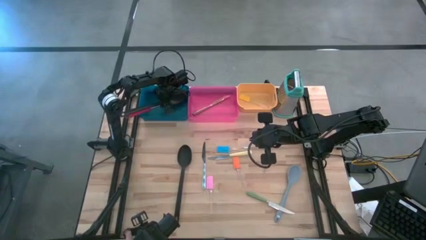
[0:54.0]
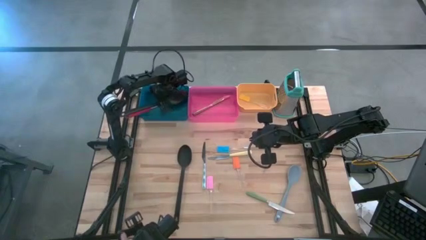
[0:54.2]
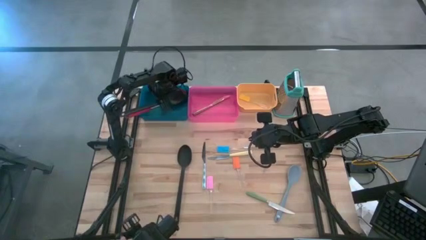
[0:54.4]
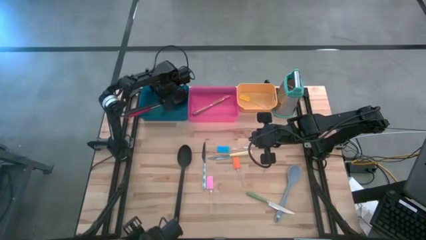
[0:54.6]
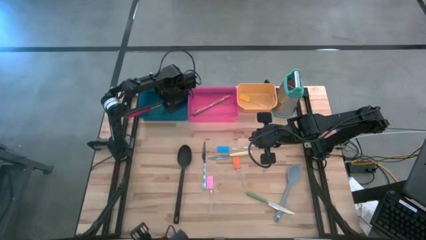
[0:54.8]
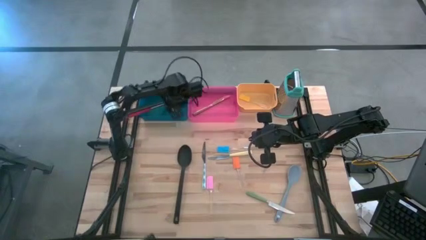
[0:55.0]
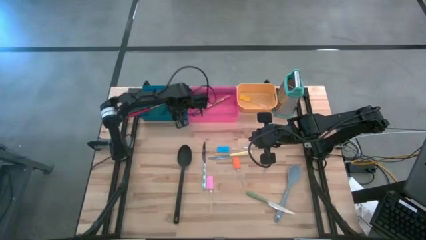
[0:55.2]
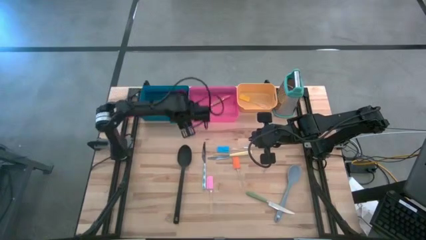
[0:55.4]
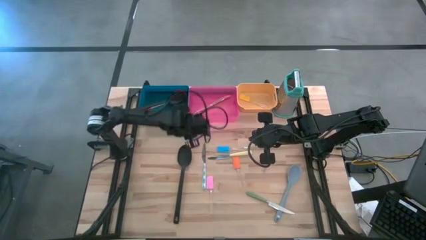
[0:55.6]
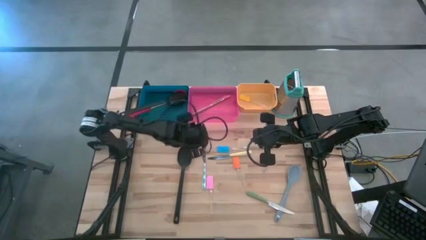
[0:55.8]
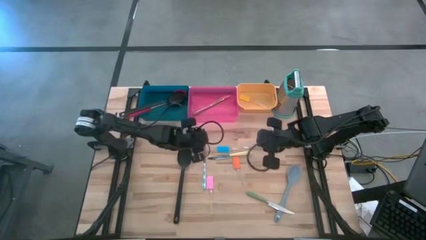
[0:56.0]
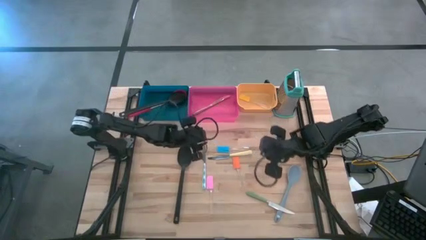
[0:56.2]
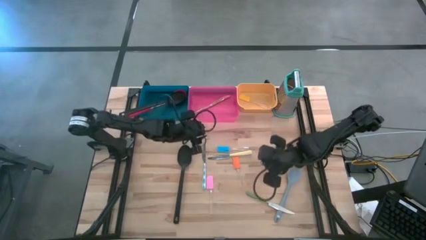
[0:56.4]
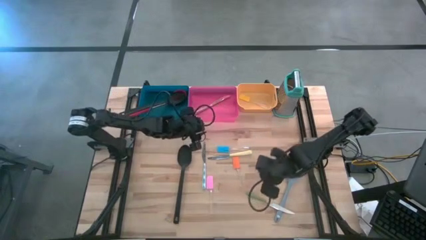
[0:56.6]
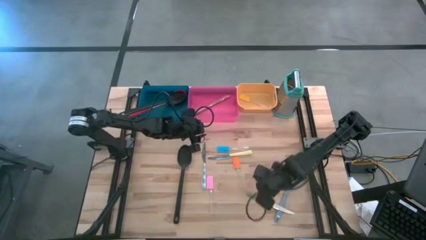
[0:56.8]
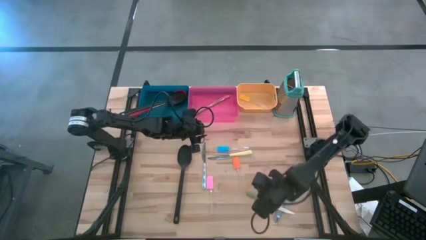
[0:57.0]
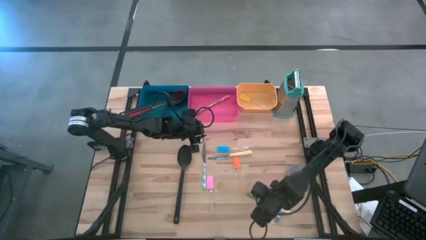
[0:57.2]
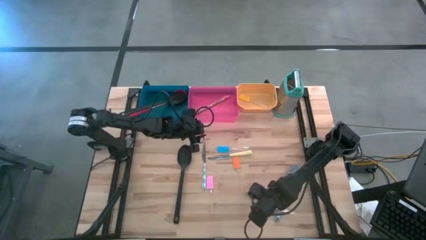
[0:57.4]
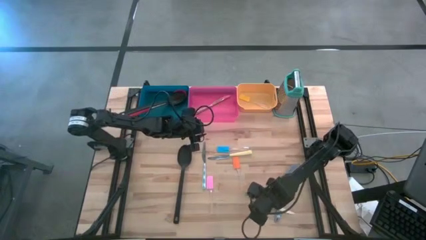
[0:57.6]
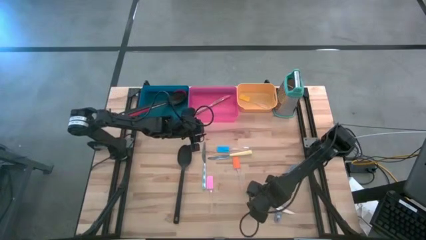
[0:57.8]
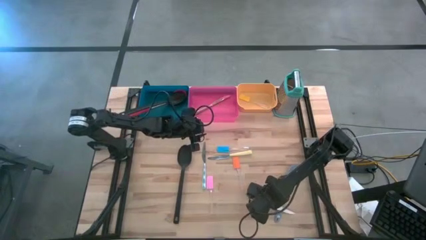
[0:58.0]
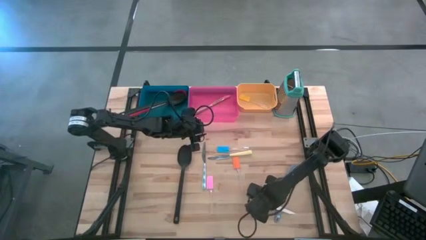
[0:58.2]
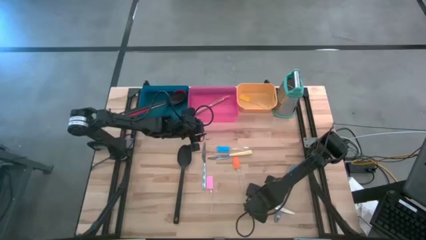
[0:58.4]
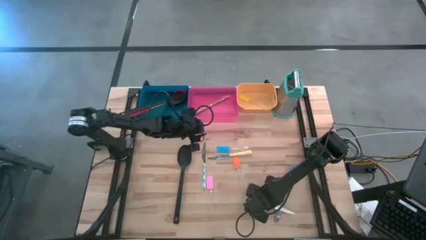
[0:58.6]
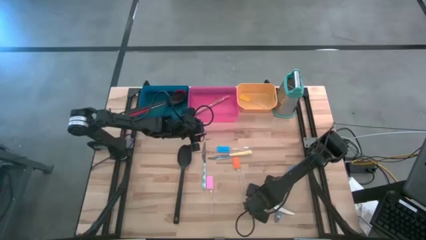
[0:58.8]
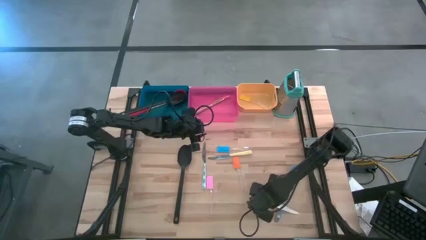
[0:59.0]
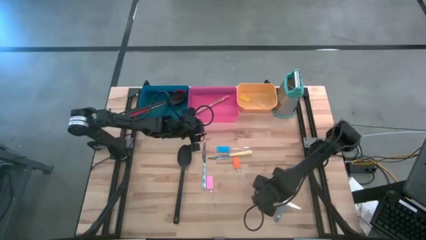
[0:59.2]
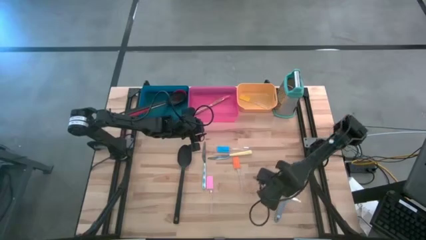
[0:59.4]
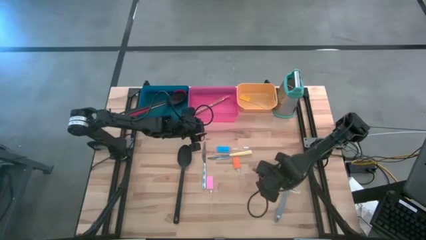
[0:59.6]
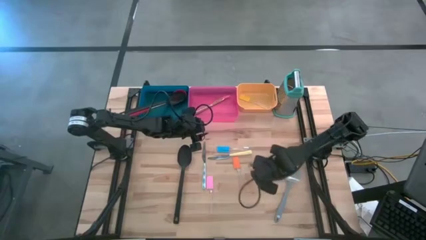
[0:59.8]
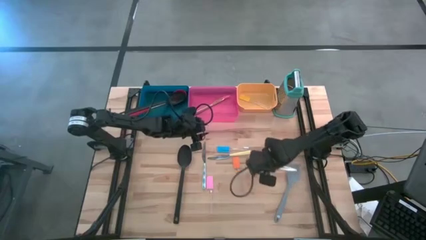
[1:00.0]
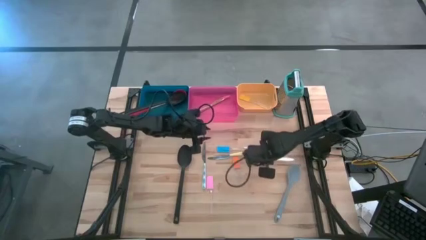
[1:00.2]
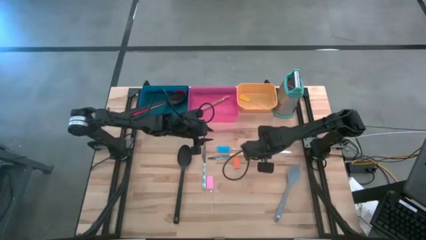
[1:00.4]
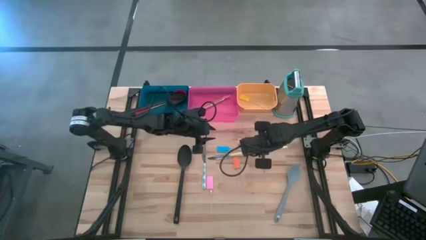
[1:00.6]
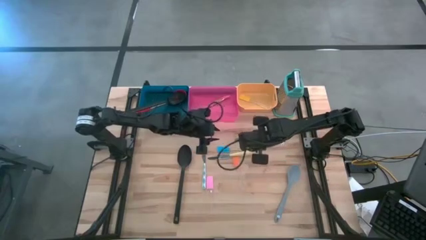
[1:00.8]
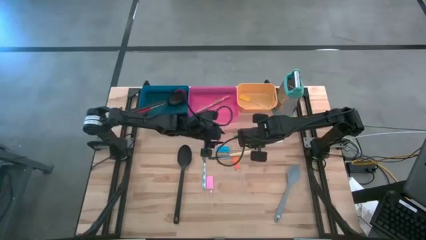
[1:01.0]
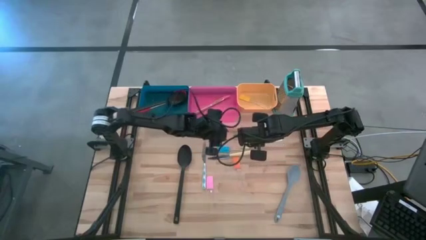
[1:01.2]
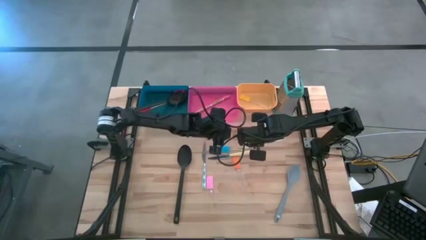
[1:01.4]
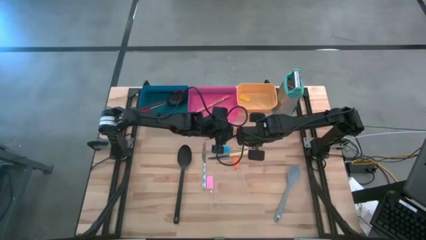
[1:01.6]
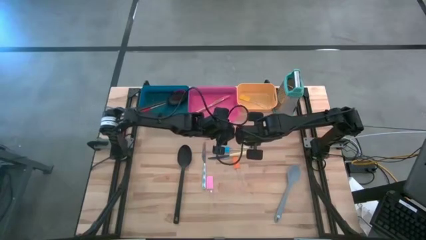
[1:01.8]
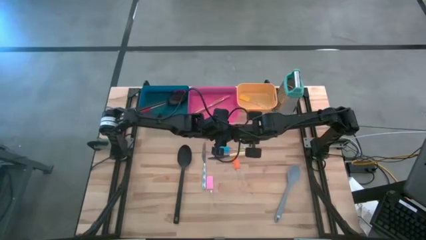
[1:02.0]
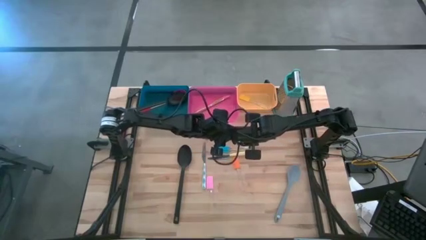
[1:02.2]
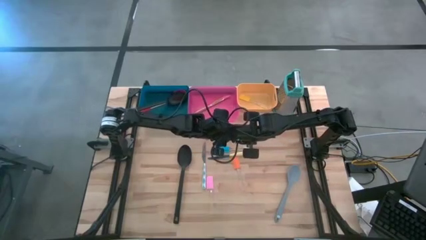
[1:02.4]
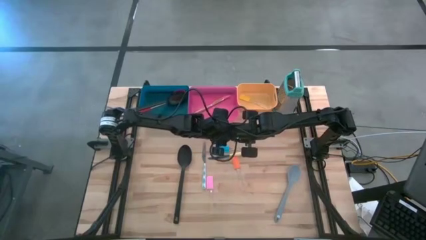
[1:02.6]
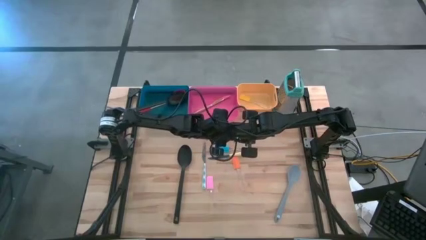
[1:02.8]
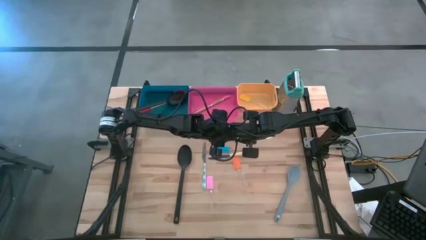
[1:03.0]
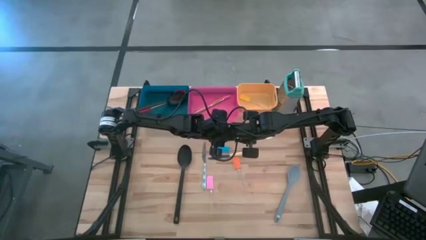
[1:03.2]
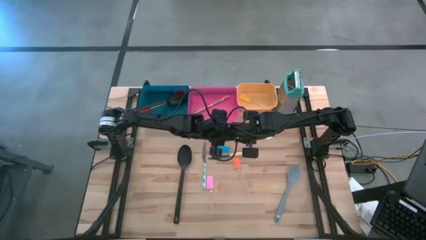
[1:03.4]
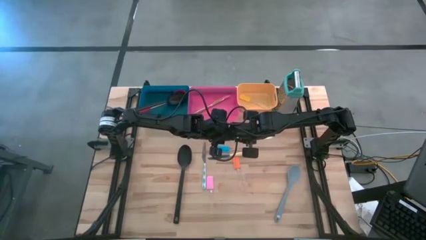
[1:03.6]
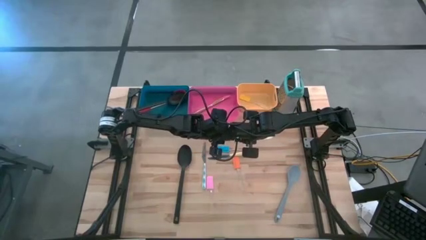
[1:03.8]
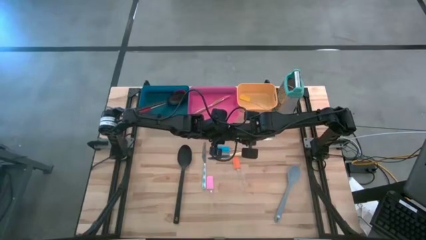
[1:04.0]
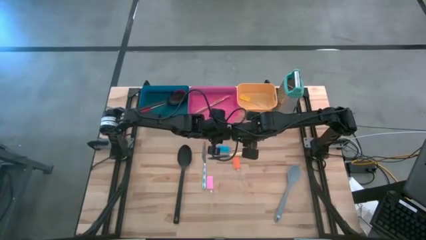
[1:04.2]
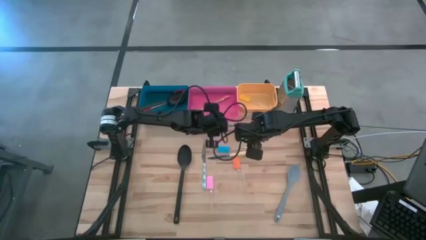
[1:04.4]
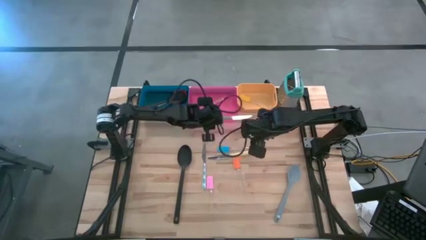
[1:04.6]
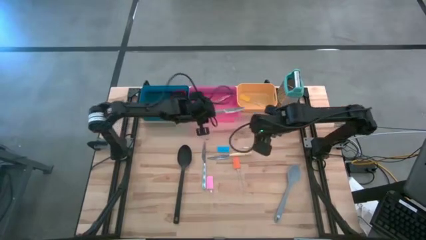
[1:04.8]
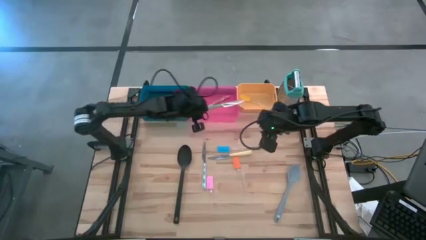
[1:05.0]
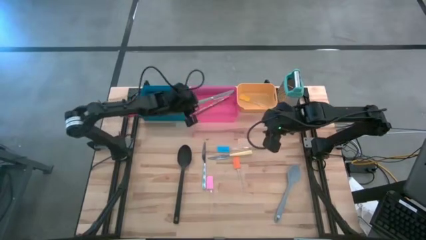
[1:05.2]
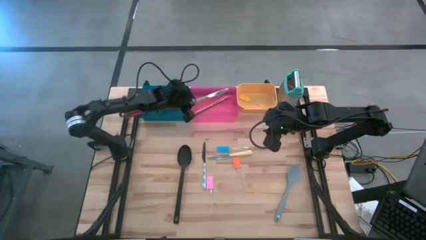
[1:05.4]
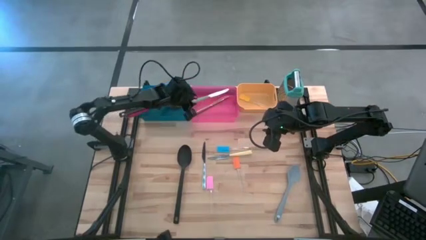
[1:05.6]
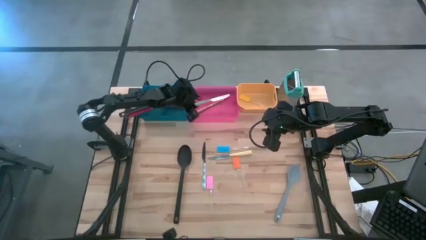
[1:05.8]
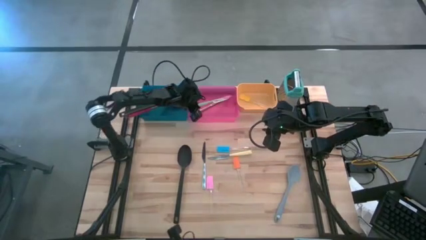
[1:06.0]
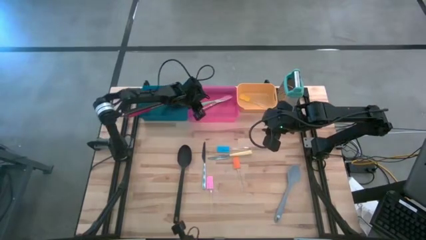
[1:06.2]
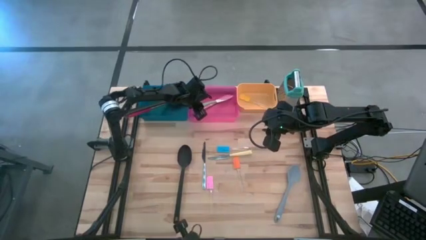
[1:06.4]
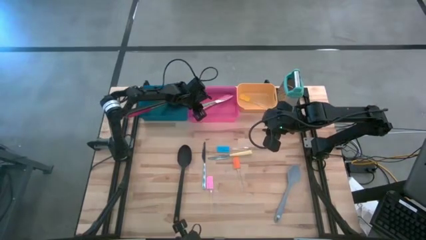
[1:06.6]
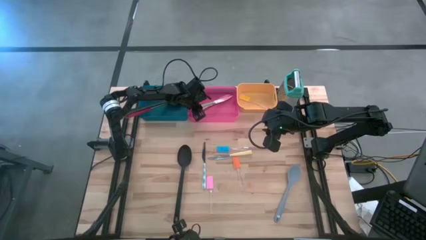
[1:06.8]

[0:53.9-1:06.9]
Task: Pick & Place Kitchen Items
Put the green knife into the pink bin
